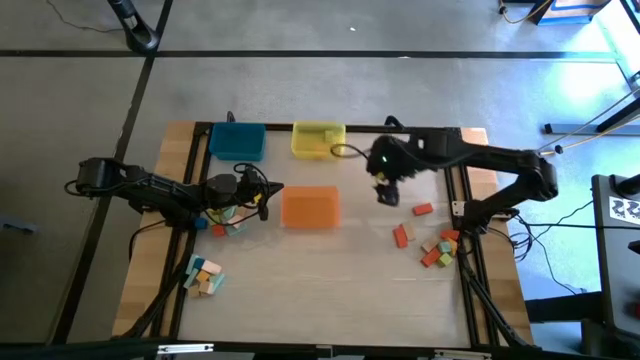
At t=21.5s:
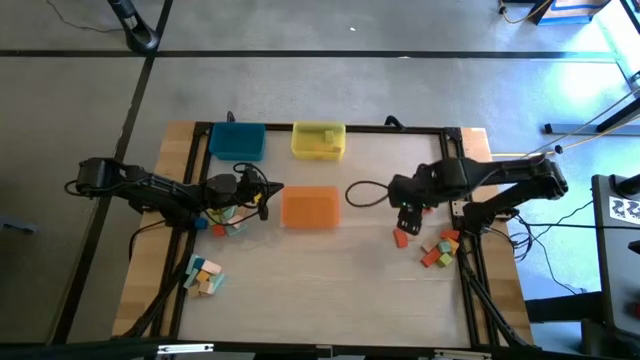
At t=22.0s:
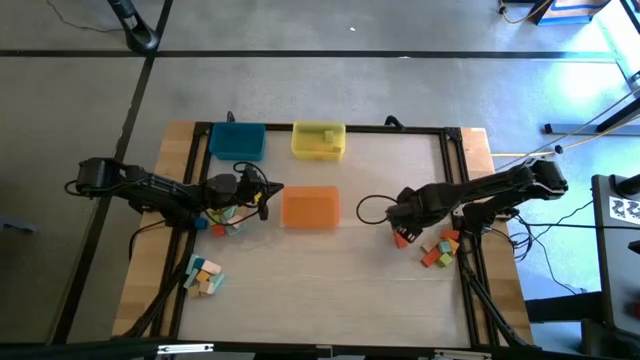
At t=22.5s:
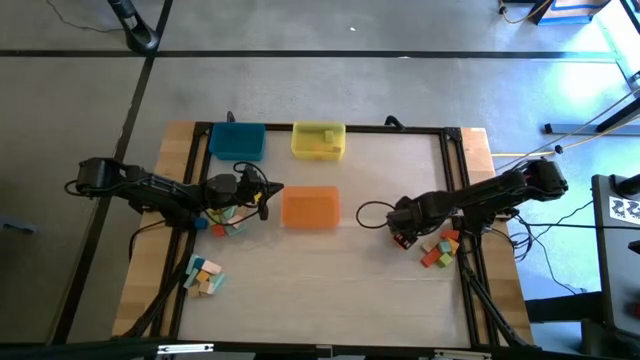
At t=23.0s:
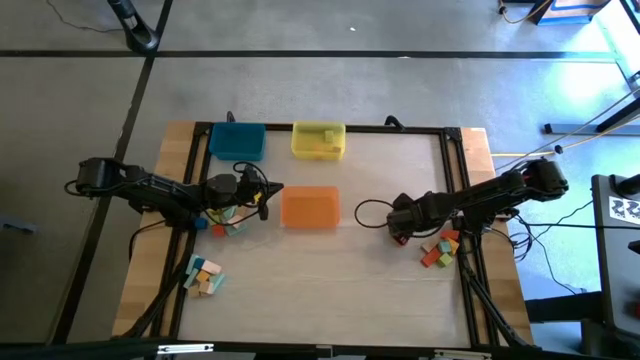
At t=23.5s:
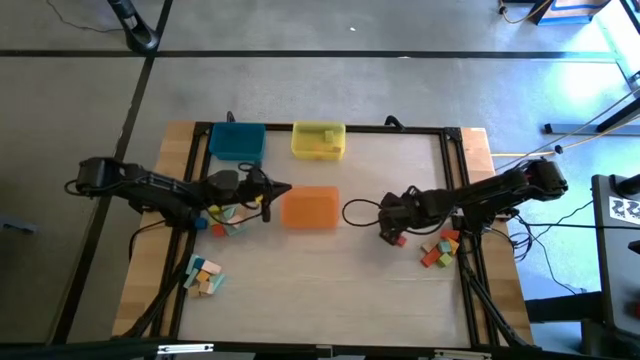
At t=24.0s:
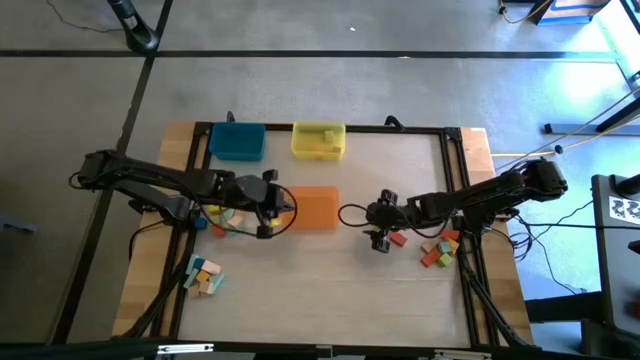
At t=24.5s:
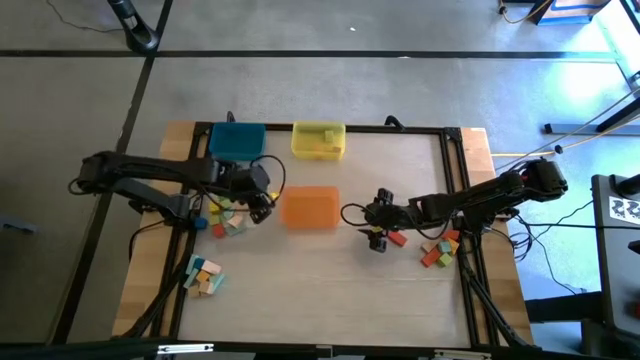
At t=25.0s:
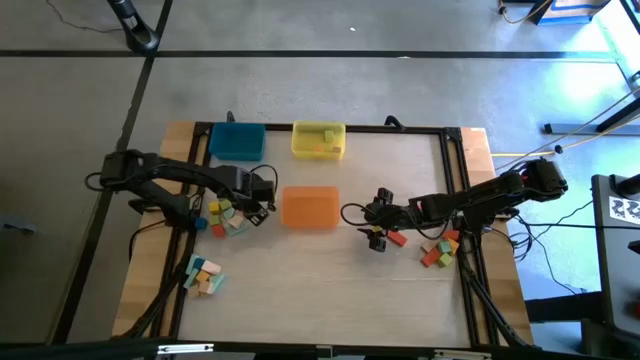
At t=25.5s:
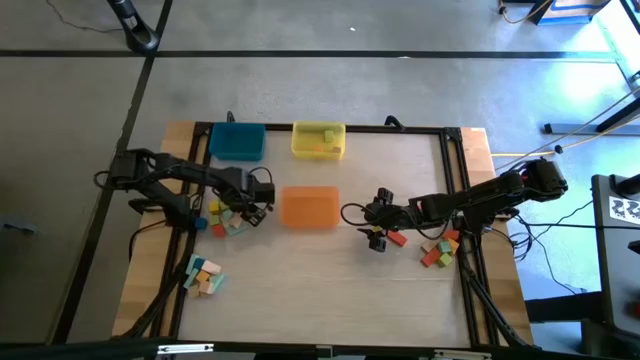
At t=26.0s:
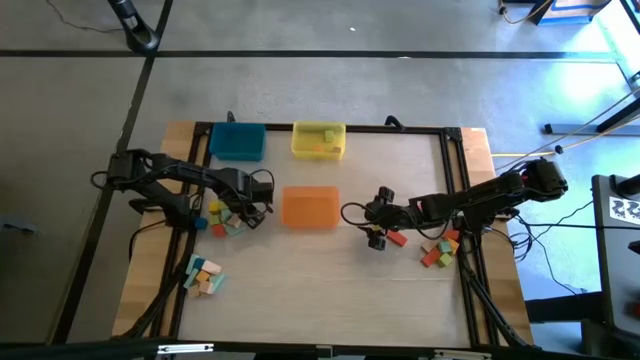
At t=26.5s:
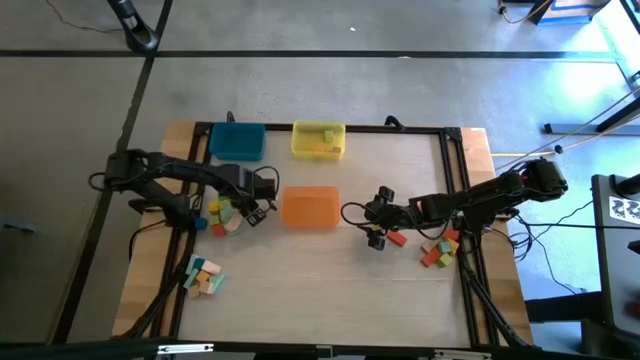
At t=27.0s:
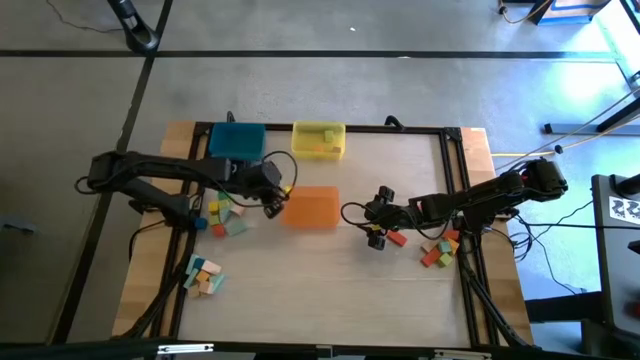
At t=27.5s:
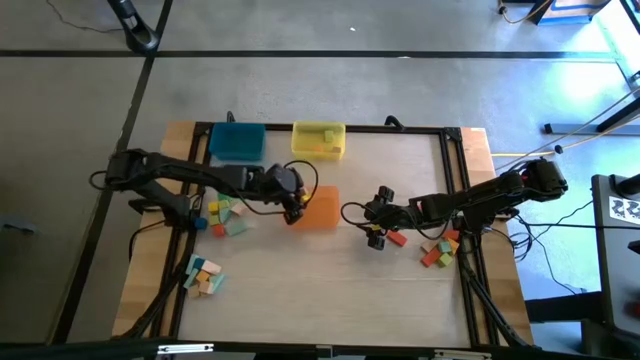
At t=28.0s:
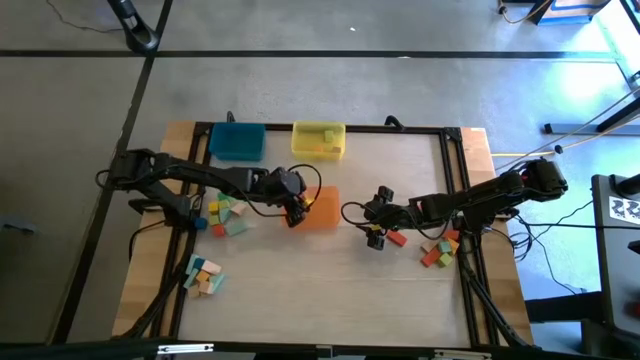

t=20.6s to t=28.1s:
Task: Sort blocks by size
Put the brown rectangle block into the orange bin

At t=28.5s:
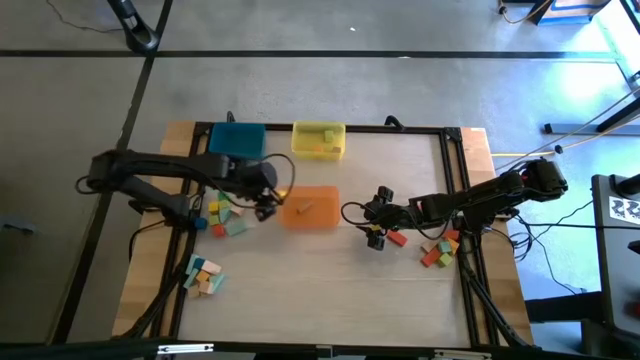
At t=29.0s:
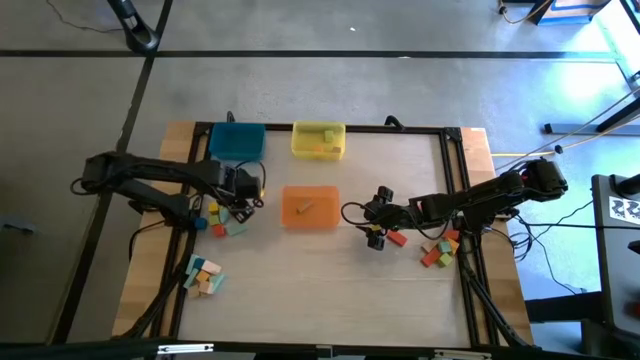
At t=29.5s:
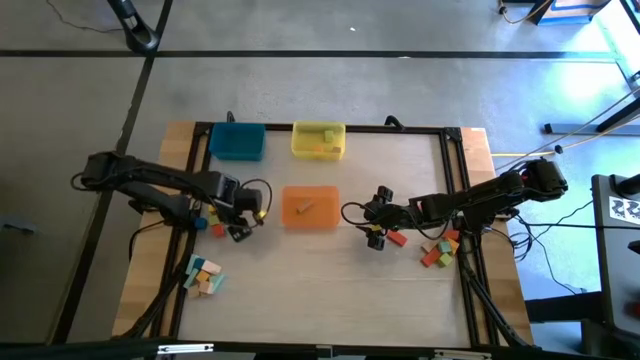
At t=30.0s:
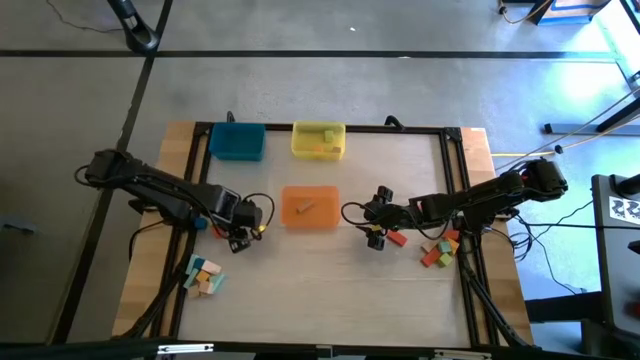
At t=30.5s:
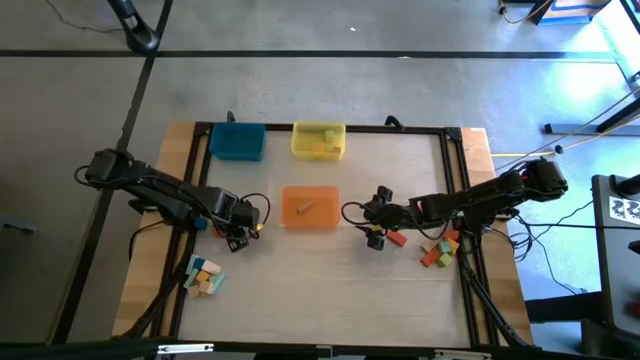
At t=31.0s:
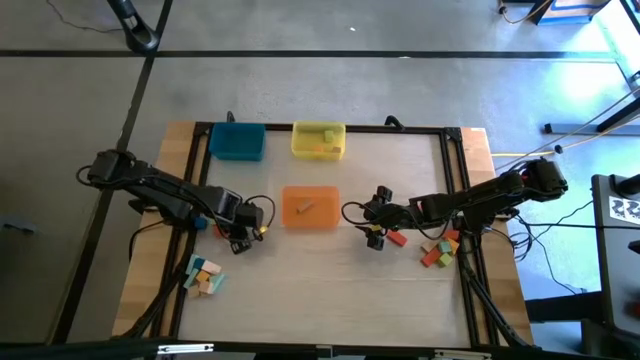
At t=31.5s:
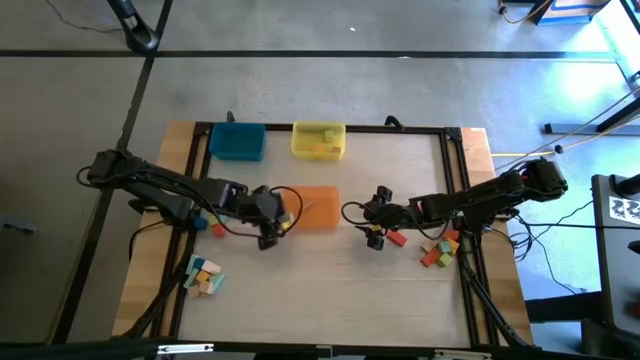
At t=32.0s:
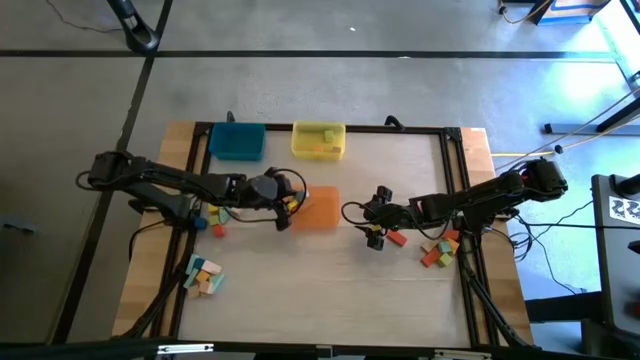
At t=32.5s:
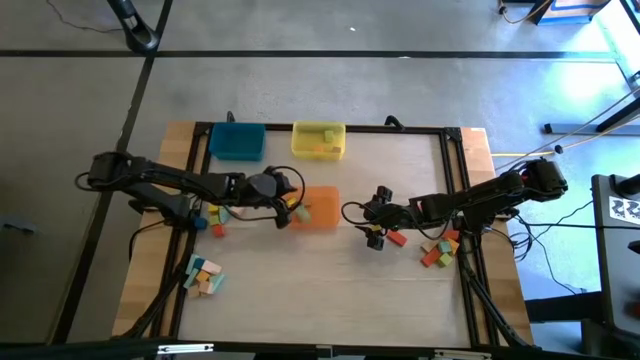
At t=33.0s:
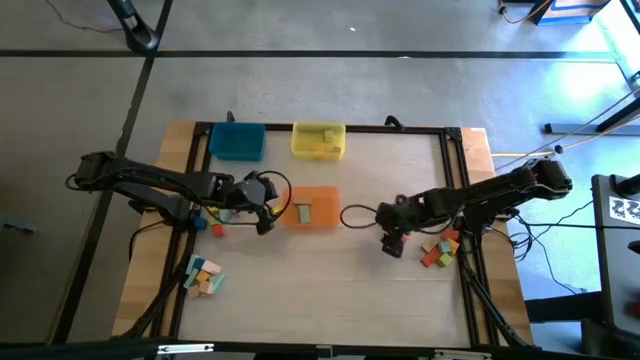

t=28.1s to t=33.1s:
Put the light blue rectangle block into the orange bin

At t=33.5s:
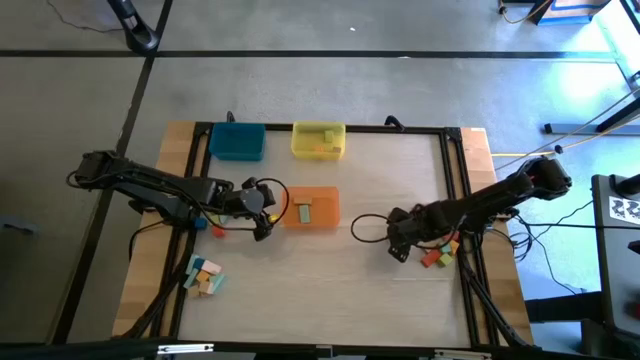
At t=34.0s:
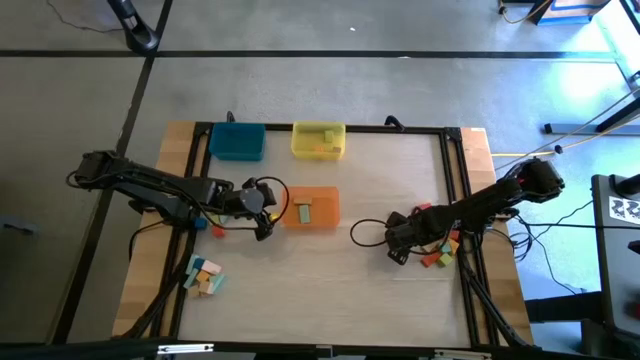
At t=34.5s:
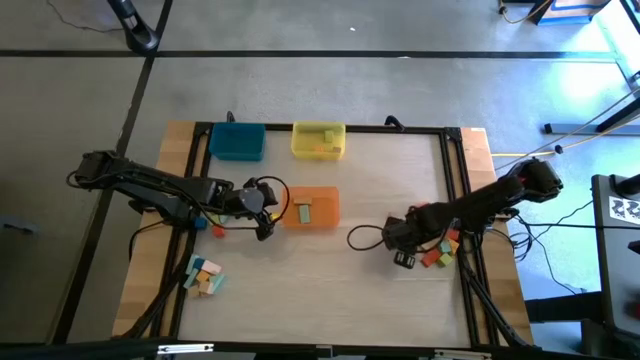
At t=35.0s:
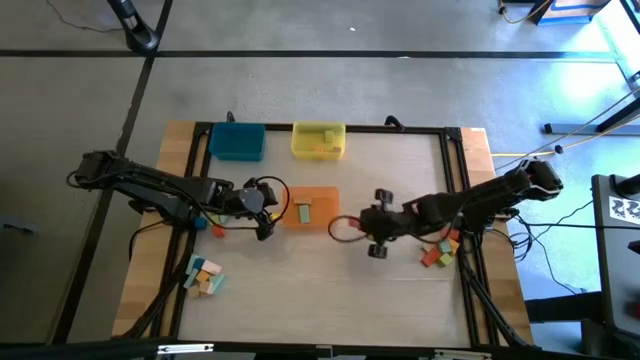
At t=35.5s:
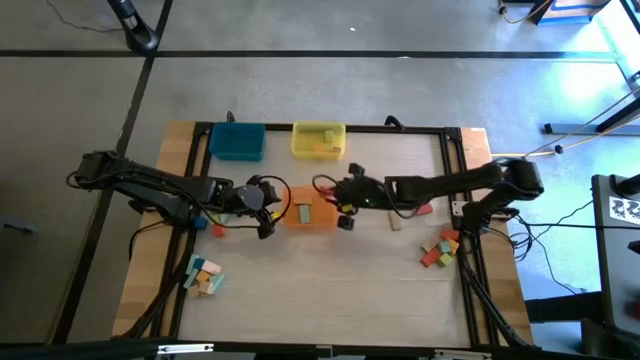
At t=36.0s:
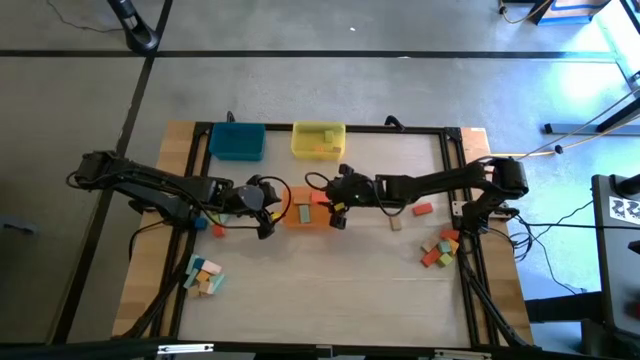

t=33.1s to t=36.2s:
Put the orange rectangle block into the orange bin

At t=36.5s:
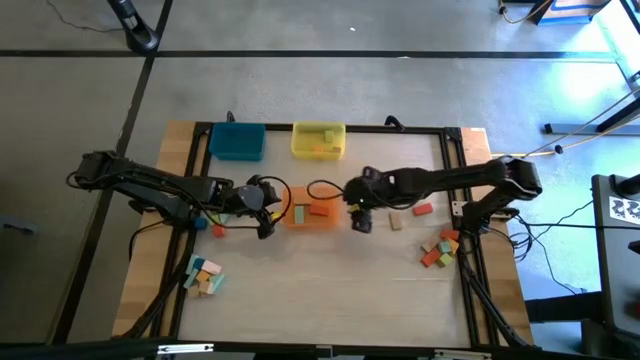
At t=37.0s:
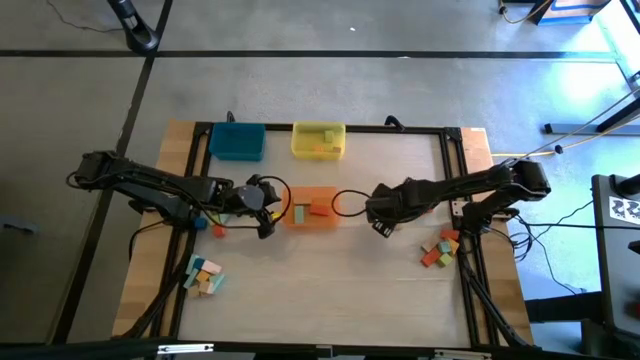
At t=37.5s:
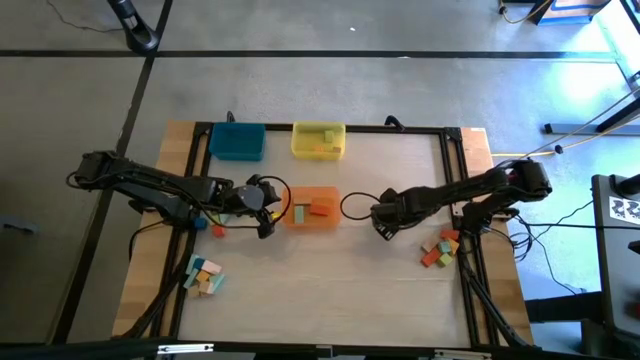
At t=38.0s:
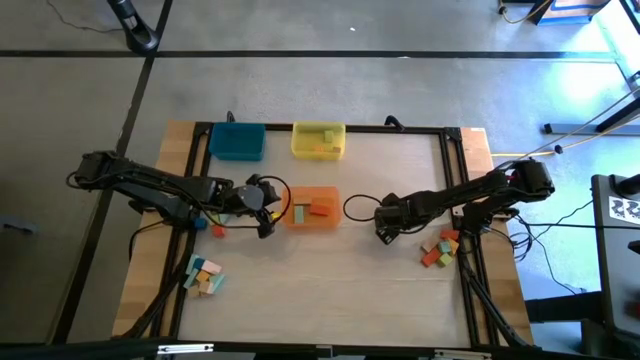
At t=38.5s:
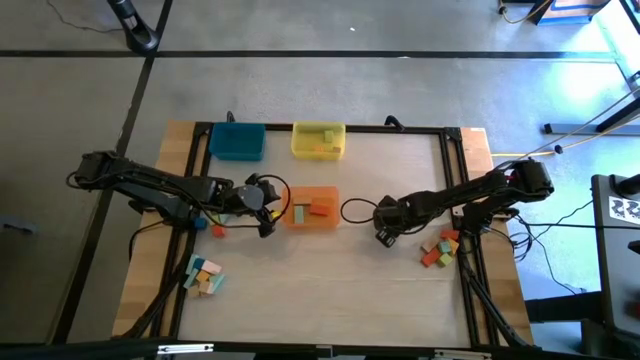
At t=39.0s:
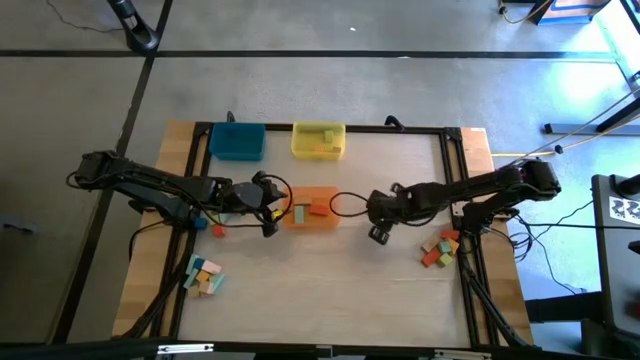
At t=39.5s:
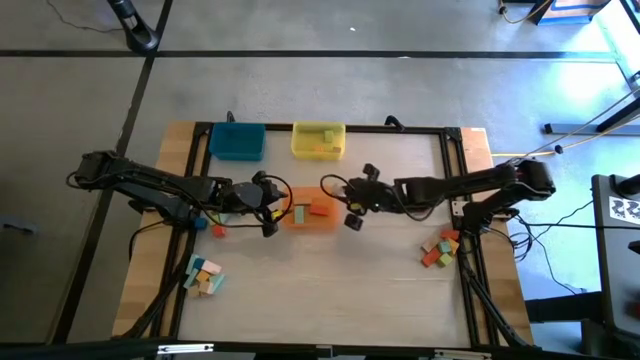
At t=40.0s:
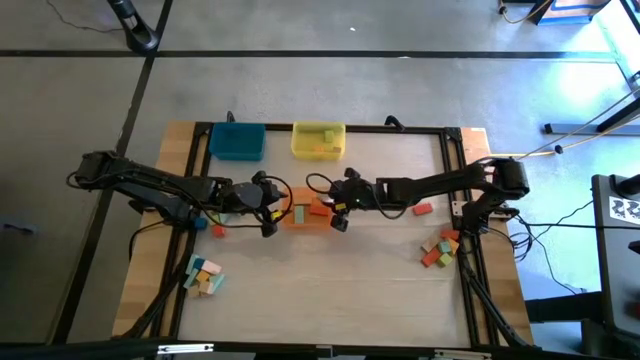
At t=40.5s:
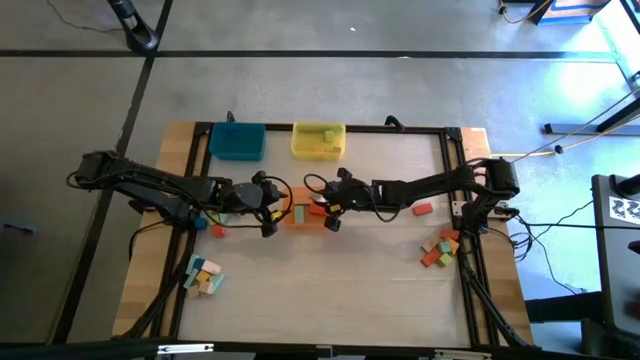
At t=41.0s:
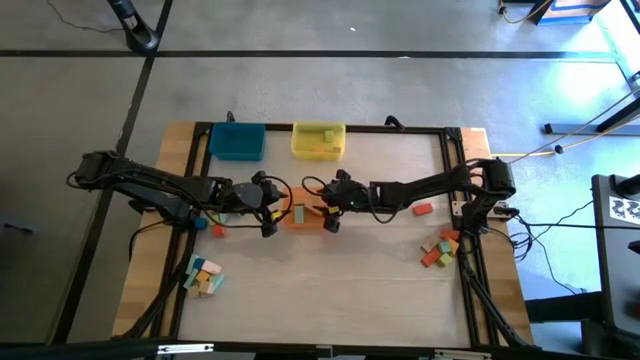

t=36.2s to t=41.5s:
Put the brown rectangle block into the orange bin
